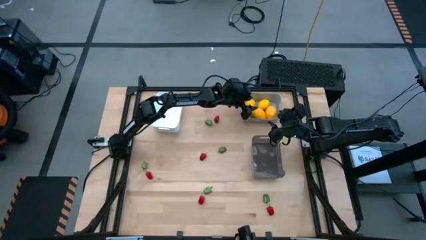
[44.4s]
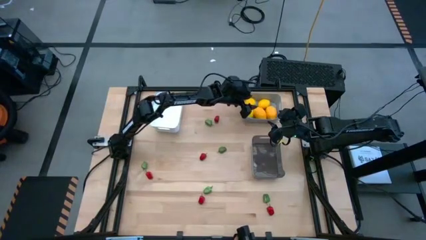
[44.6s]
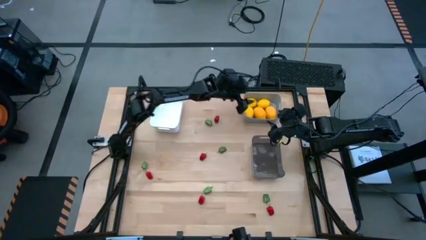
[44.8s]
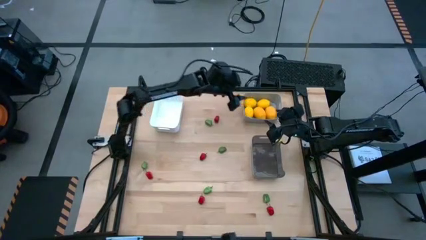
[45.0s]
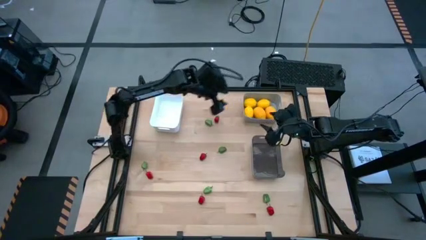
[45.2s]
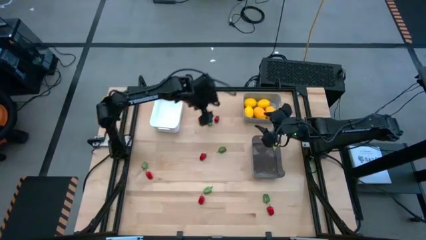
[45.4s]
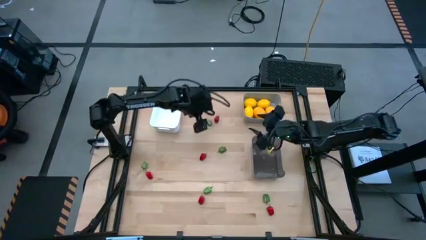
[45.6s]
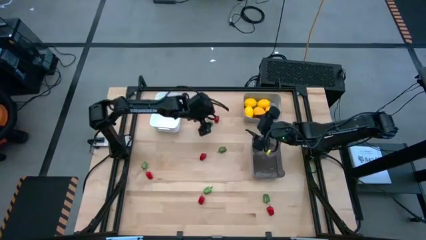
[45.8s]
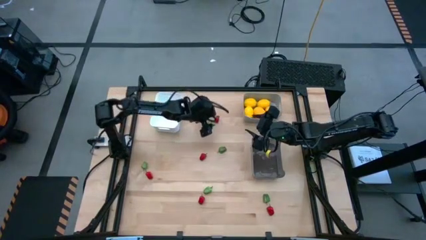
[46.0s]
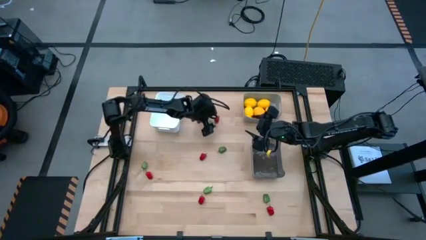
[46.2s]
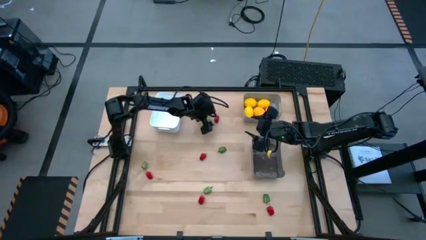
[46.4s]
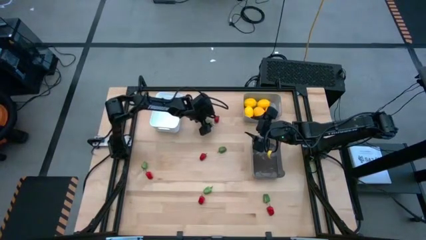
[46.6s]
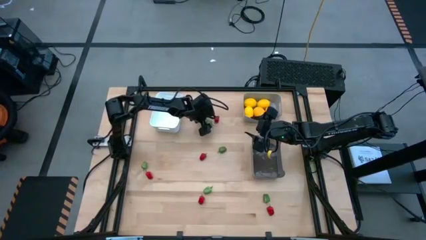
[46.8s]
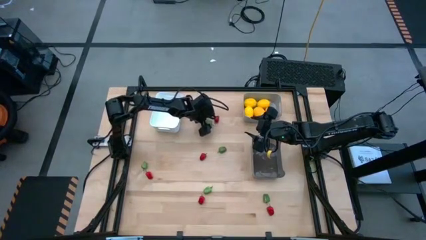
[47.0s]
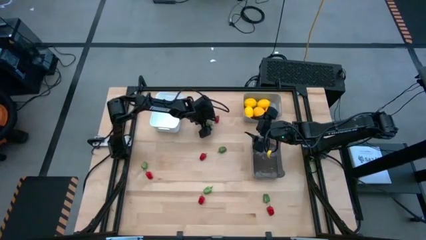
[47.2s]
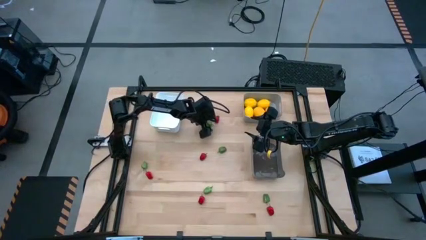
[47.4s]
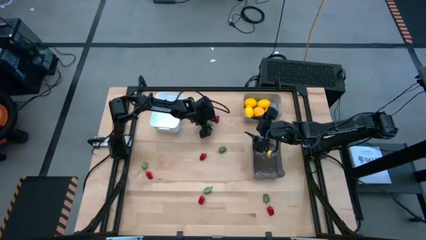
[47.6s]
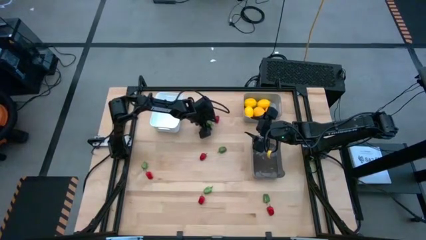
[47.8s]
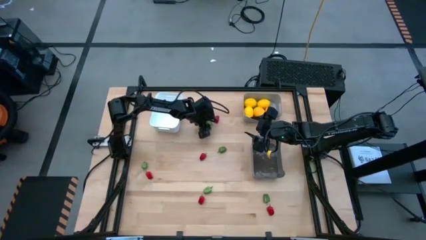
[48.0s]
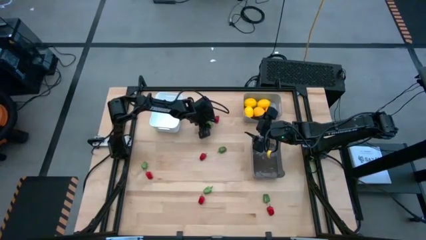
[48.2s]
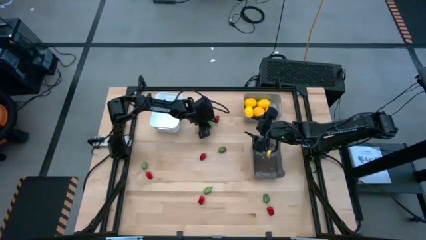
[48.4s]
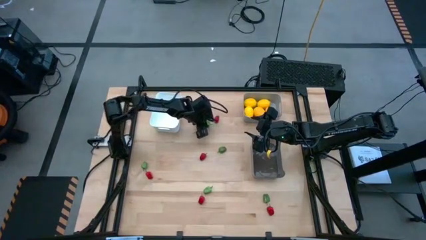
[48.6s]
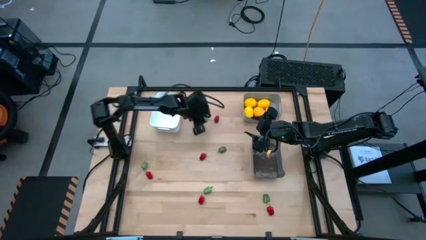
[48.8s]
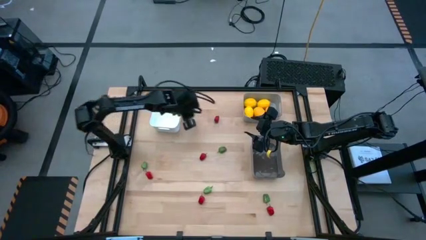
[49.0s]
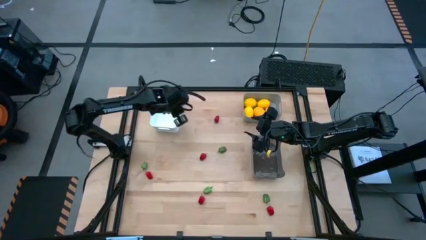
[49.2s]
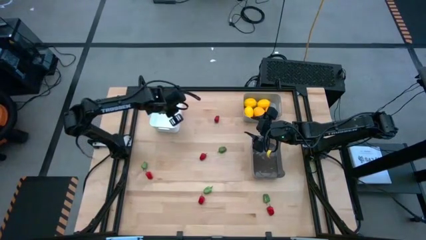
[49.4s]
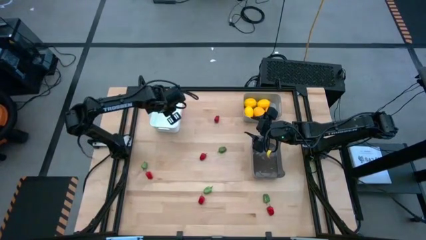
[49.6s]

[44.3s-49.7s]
Task: Sort produce into baskets
Put the green bell pepper into the white bin

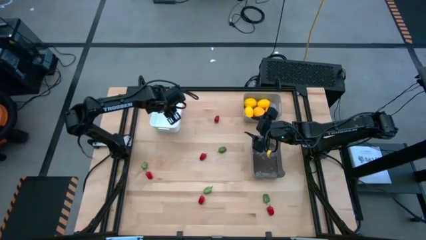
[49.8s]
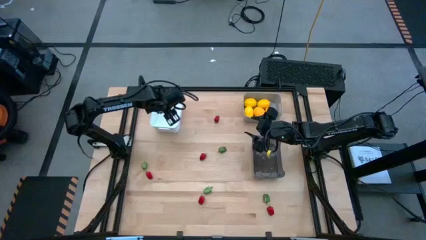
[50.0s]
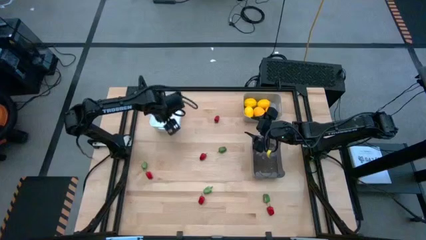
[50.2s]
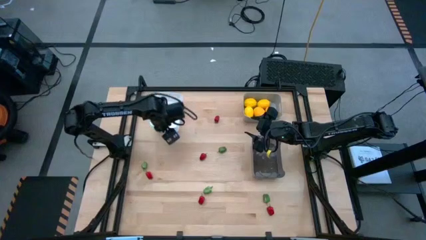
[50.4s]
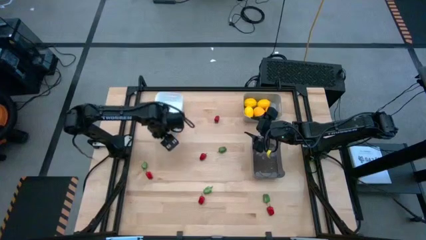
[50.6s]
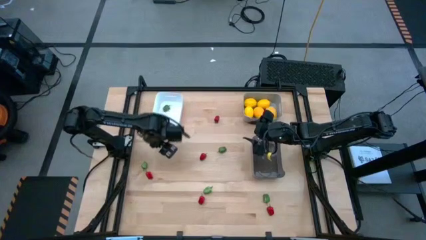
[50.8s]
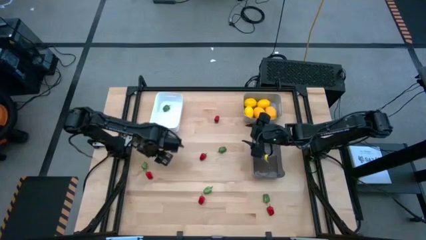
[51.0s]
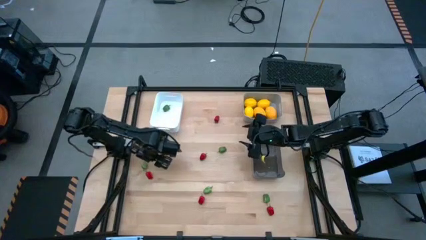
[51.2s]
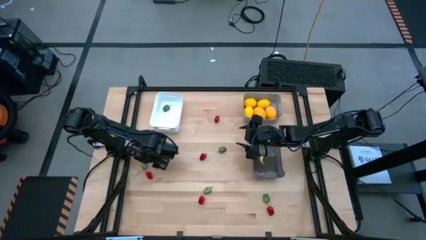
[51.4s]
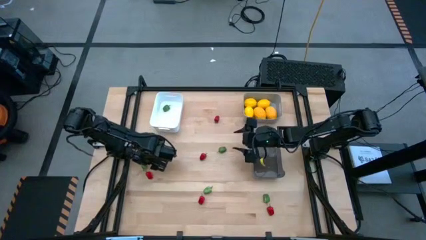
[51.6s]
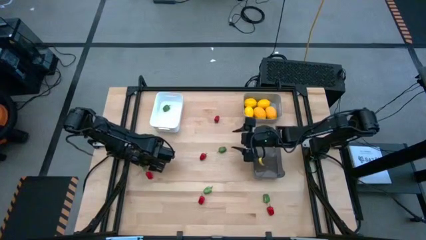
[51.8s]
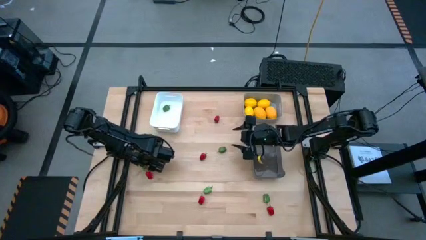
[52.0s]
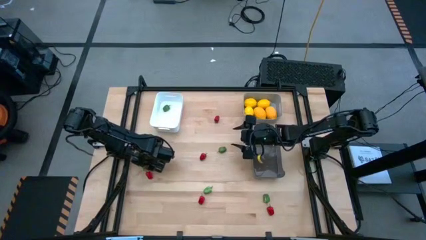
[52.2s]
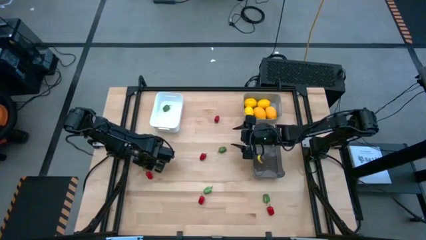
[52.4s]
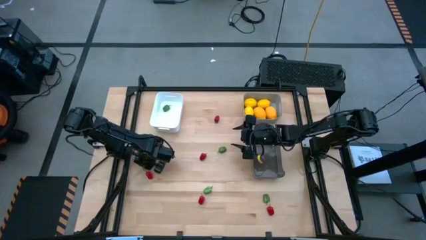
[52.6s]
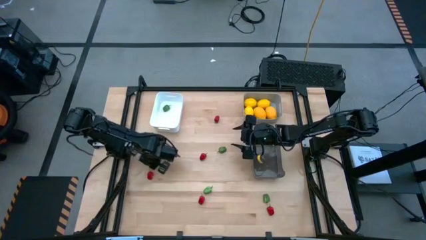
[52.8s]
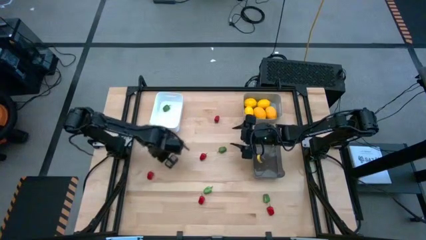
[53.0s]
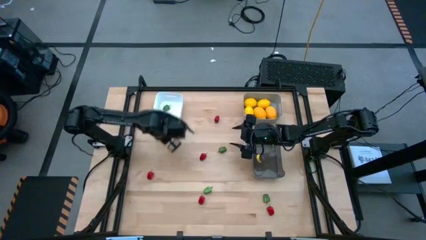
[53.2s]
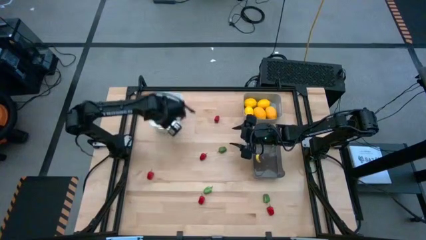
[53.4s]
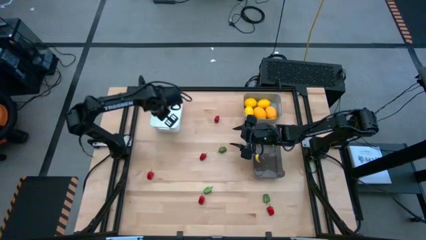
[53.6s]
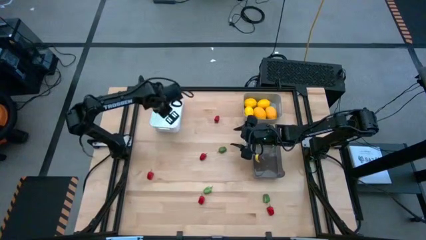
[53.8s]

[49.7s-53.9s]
Put the green chili pepper into the white bin

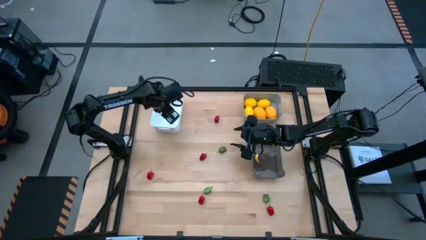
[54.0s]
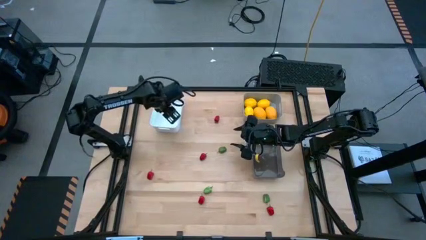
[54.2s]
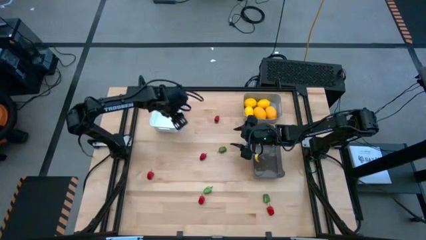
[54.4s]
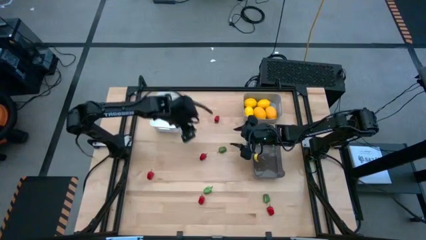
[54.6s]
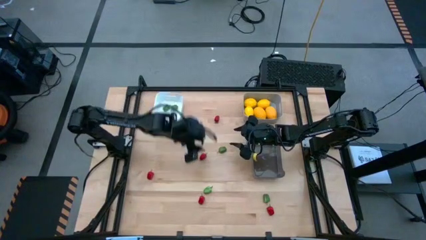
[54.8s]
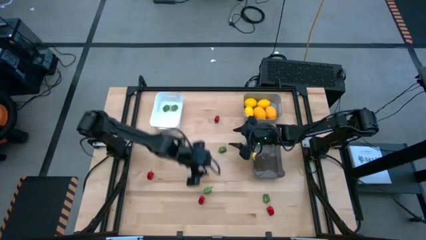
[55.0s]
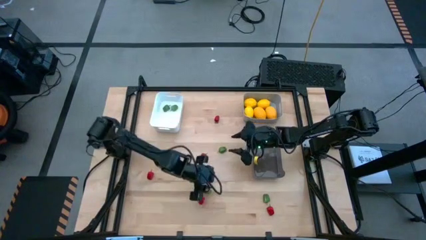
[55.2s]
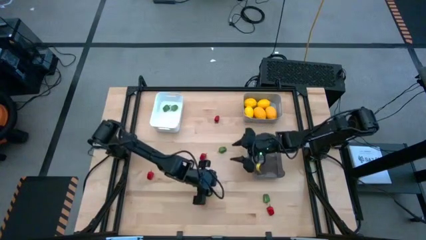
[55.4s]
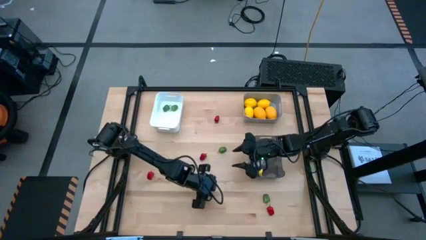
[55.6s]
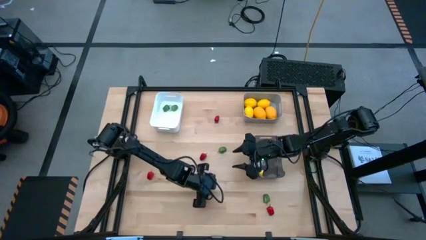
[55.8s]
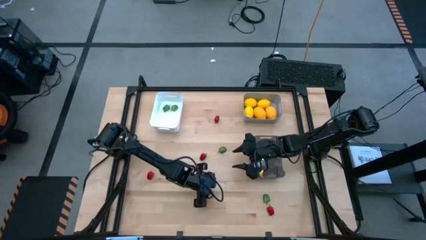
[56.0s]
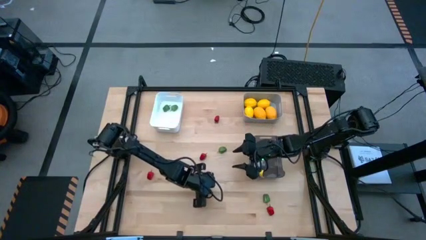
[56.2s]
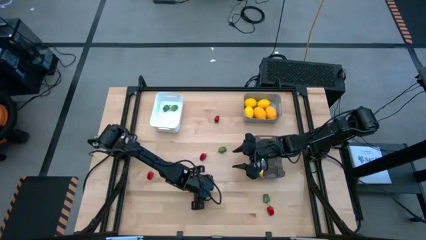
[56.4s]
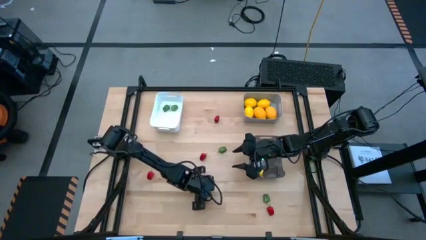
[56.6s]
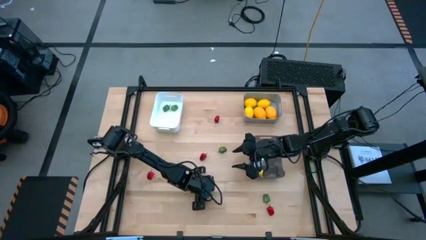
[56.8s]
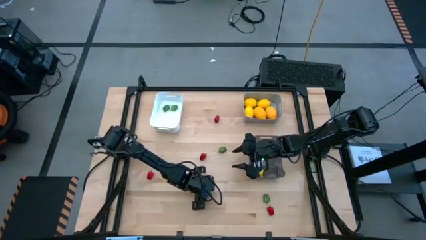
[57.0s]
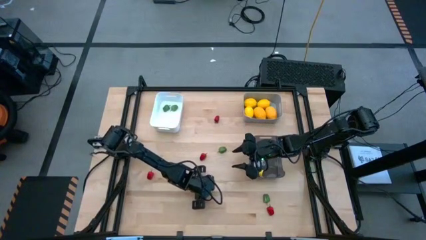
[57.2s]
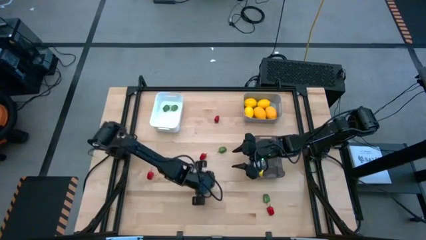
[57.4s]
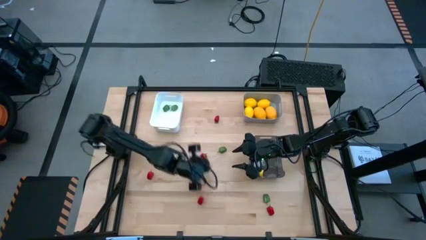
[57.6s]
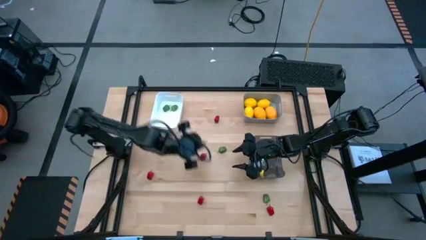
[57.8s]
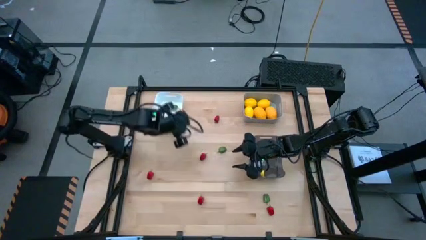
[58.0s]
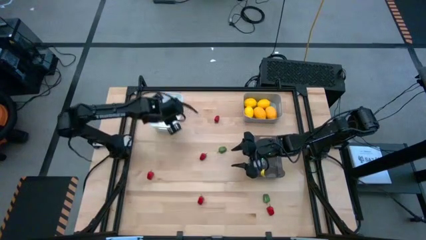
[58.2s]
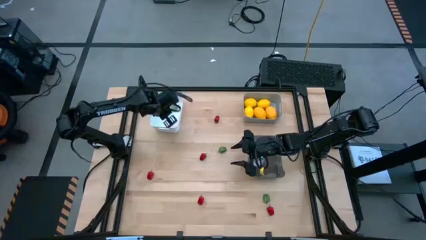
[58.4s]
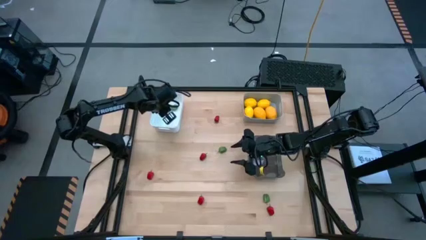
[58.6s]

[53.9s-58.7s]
Put the green chili pepper into the white bin

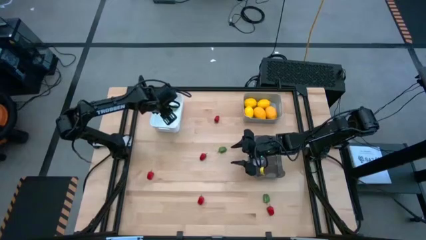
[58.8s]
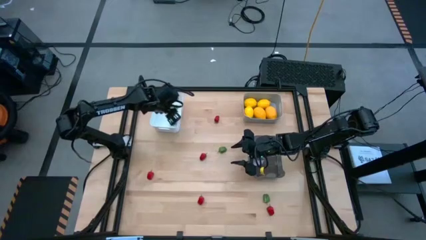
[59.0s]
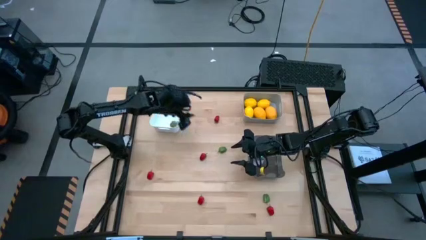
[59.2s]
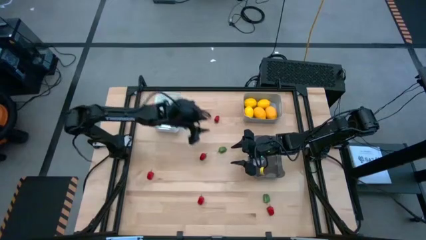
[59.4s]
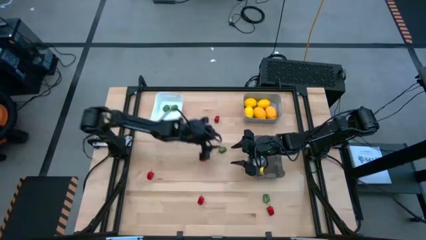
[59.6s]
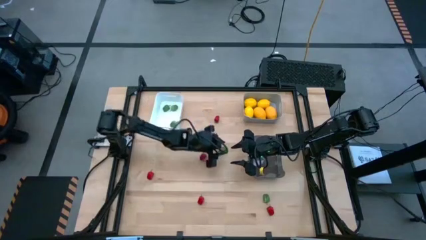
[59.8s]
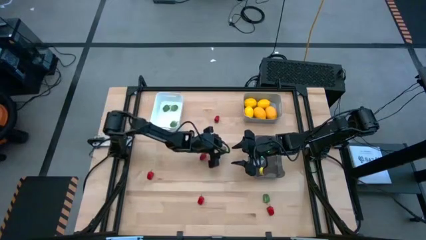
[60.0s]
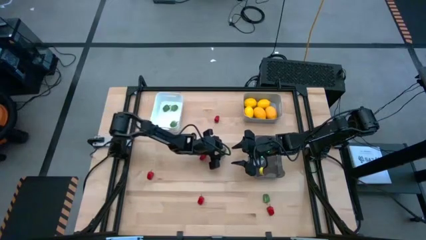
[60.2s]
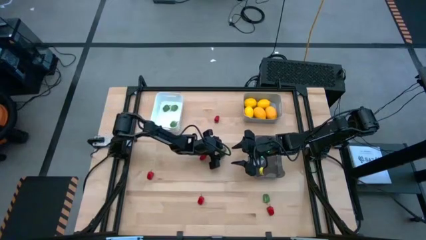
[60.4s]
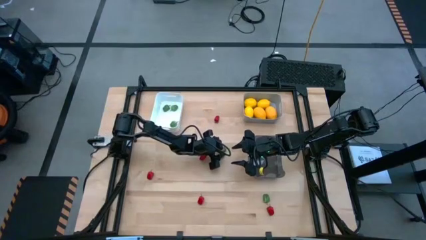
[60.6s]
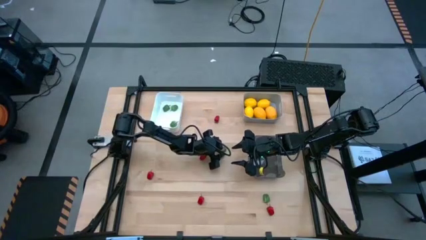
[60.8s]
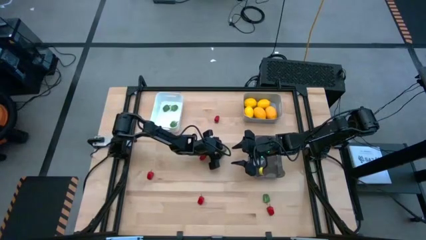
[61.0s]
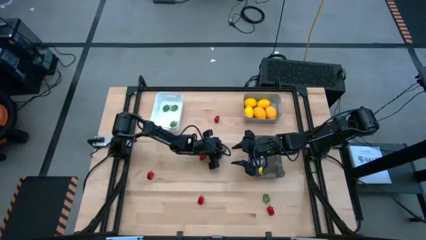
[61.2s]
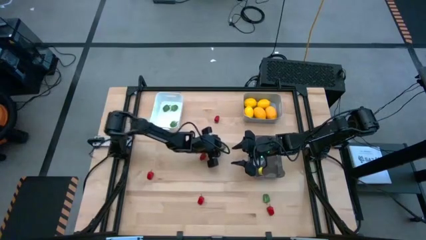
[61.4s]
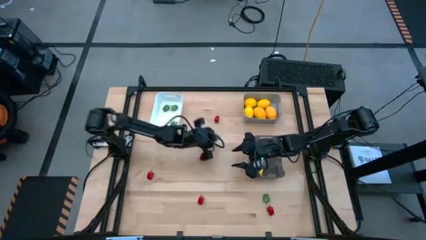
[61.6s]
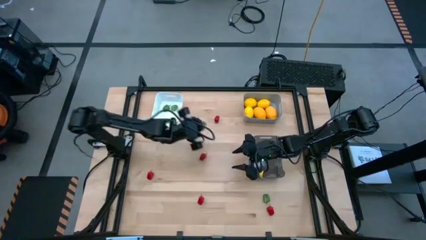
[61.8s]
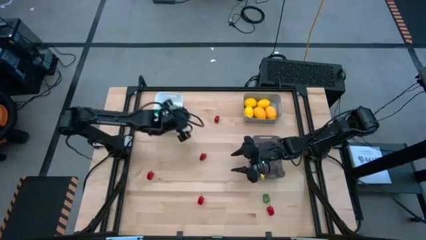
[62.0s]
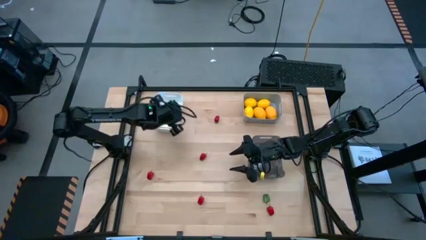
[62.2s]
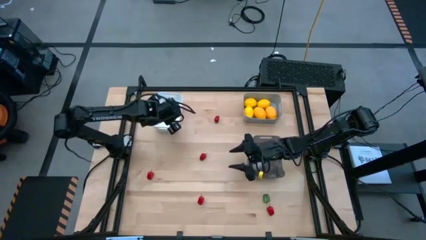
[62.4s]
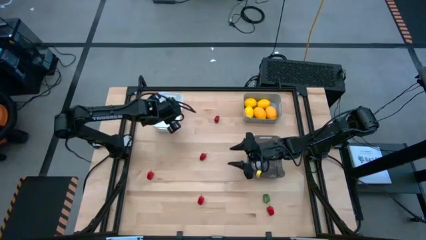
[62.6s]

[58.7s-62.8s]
Put the green chili pepper into the white bin
